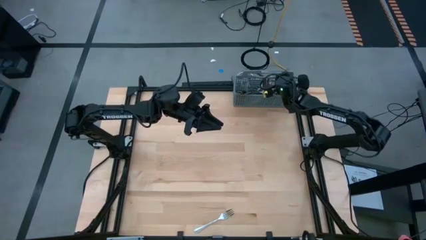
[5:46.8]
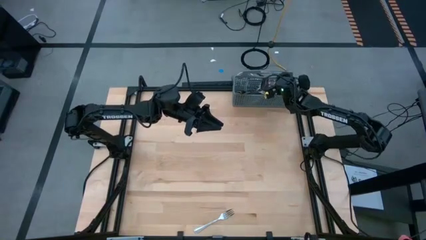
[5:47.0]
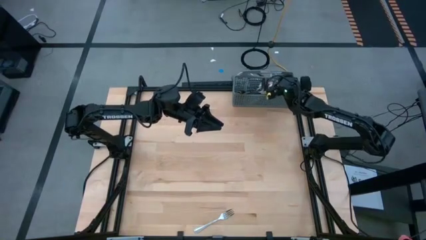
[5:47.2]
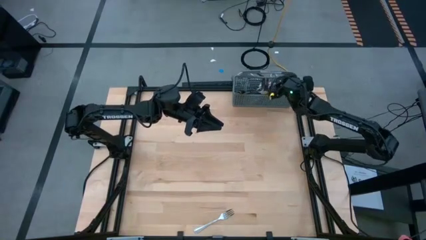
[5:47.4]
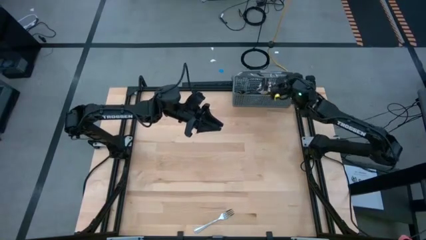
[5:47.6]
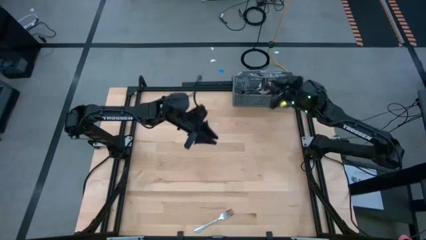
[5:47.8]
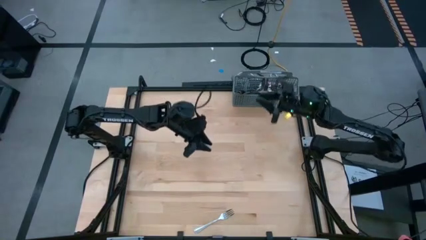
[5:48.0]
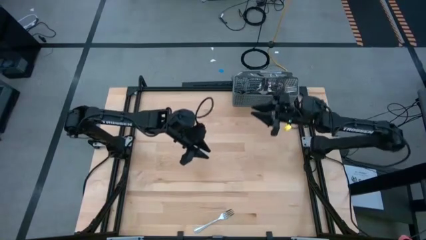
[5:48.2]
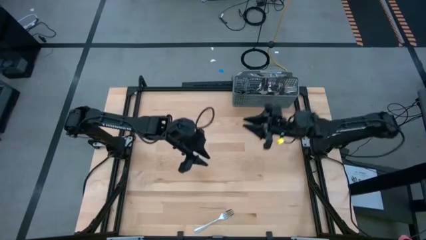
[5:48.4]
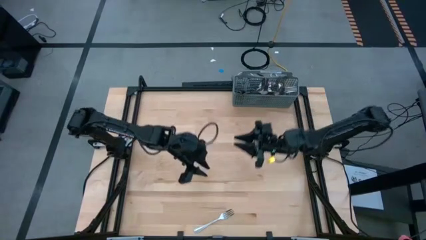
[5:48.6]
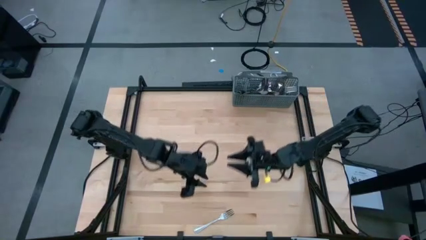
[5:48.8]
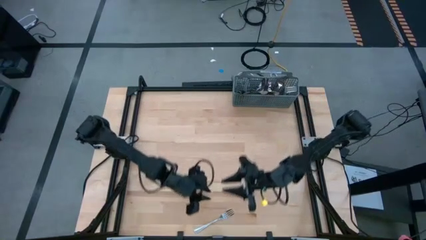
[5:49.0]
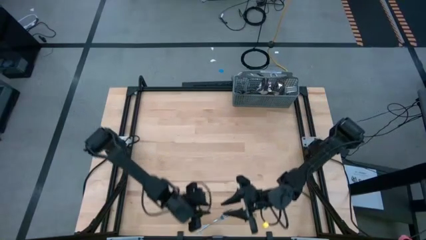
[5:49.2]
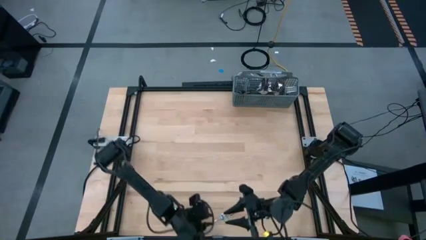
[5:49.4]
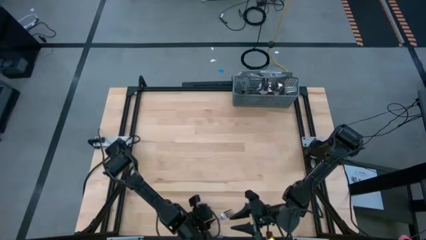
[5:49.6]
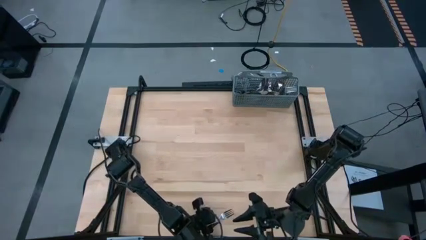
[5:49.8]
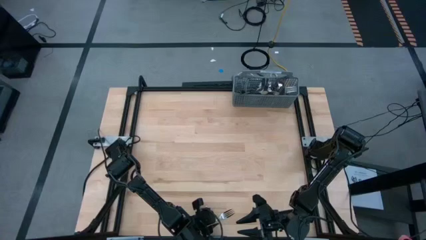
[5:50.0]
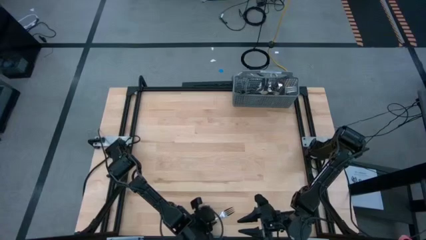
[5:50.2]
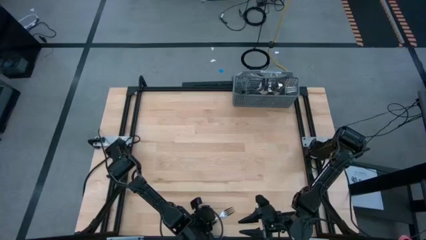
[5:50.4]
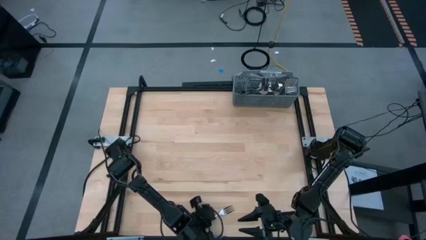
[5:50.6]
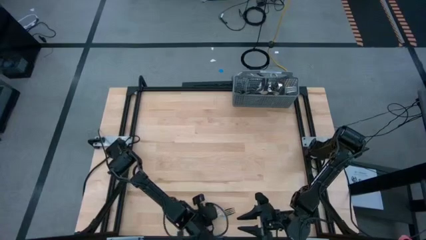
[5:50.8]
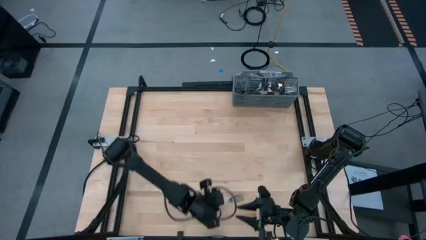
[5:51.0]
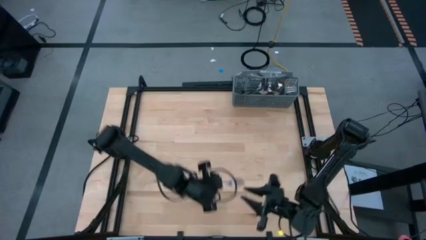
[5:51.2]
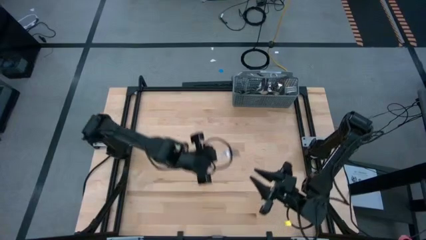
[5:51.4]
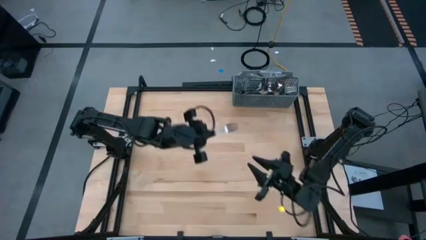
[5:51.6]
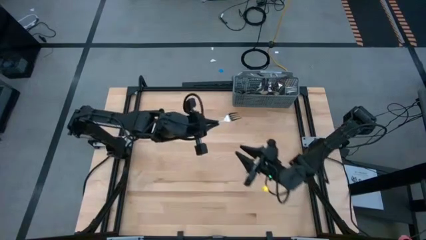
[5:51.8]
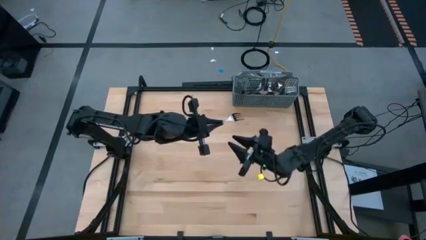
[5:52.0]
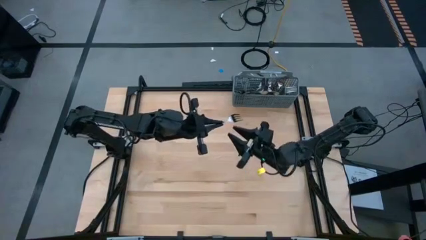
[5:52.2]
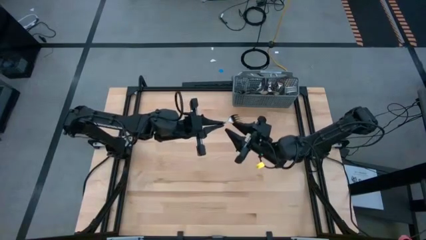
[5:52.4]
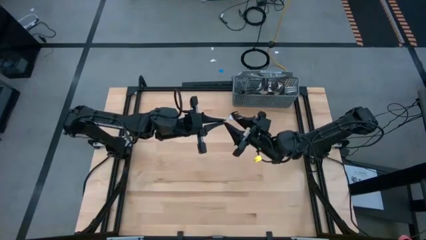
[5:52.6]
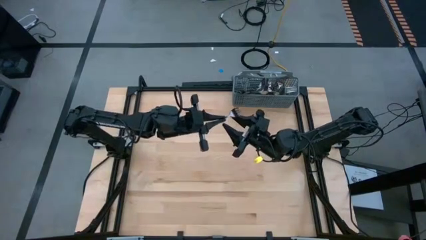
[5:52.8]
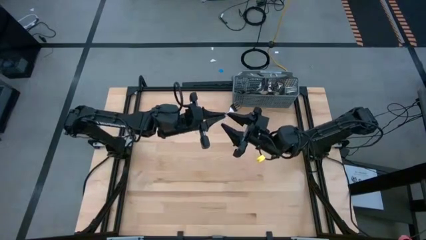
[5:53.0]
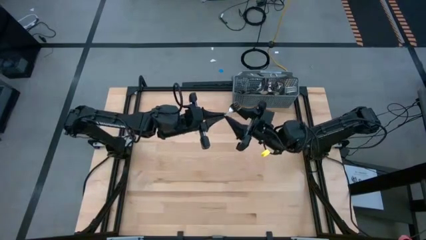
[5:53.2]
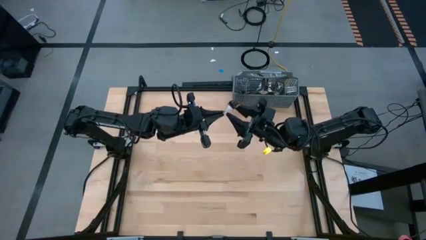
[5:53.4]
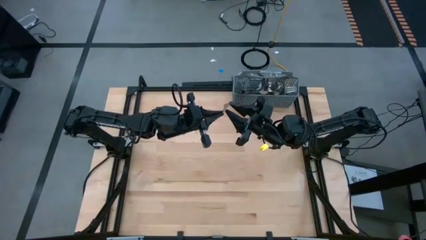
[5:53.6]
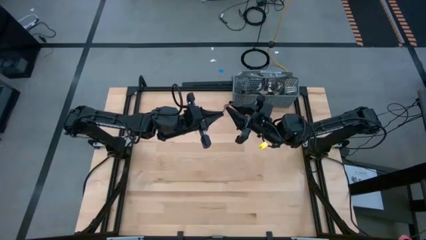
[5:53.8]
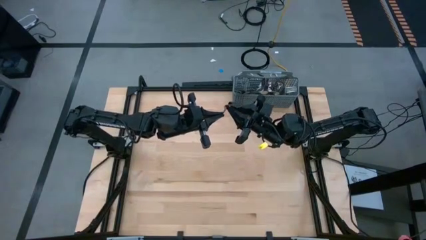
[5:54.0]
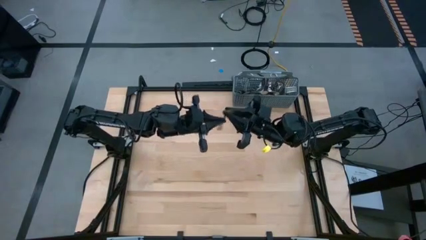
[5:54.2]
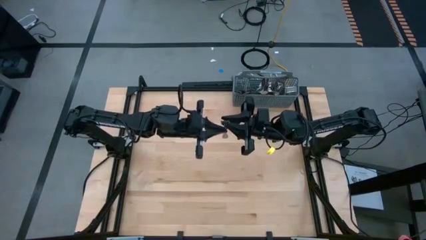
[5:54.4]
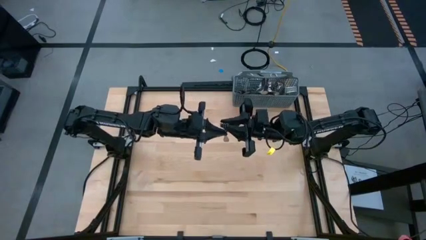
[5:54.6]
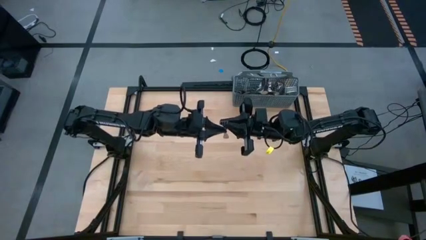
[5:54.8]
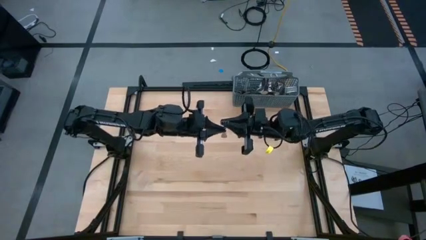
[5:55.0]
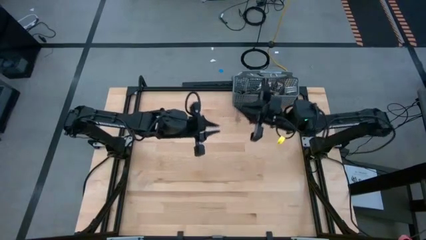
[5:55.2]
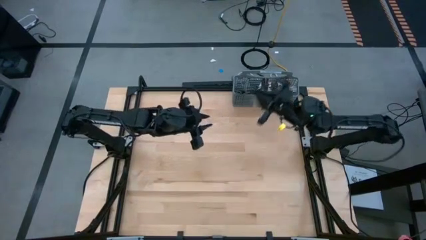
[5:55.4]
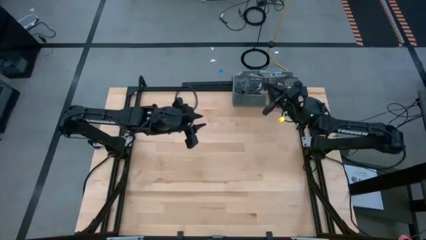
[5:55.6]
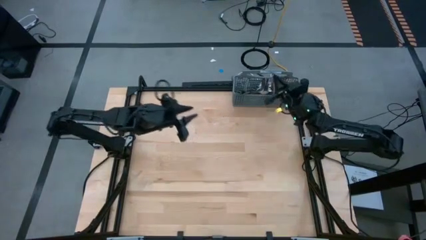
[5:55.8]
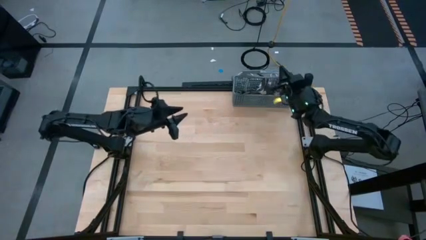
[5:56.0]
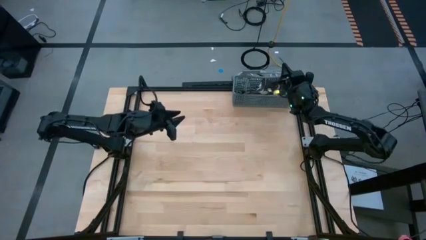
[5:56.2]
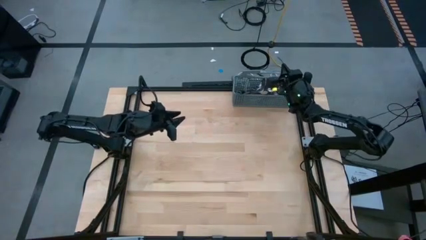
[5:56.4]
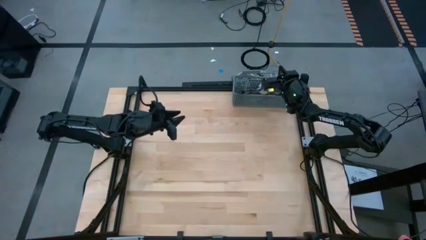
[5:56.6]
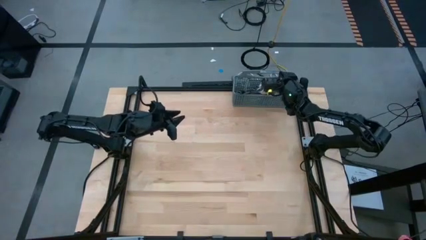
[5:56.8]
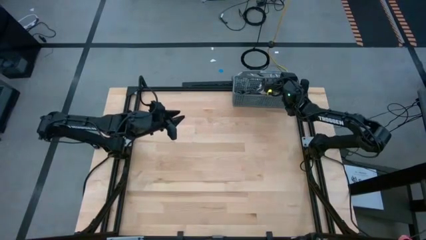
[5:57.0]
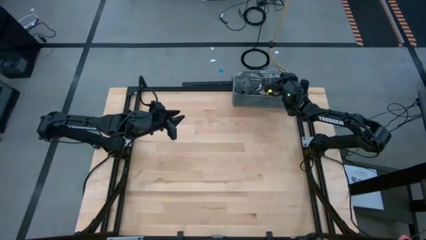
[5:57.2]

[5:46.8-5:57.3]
Task: Sort silverware
Put the silver fork into the silverware basket

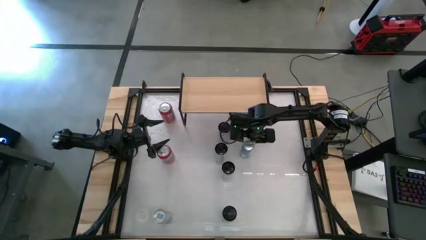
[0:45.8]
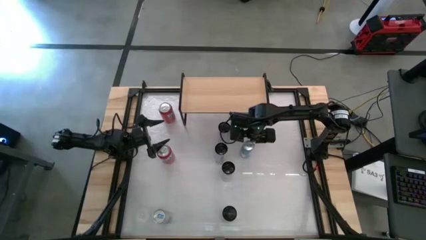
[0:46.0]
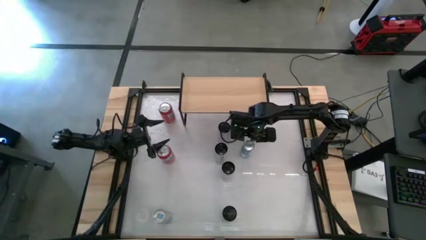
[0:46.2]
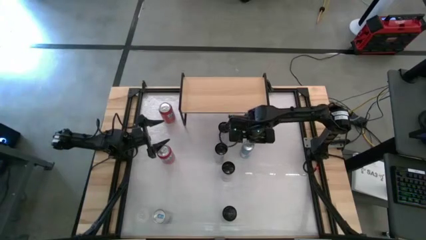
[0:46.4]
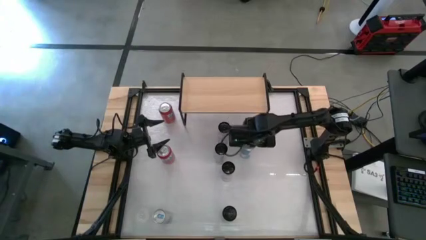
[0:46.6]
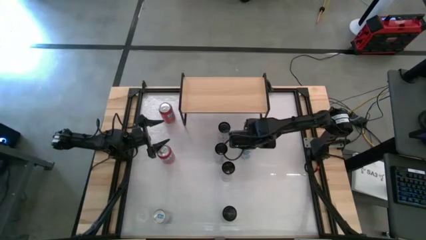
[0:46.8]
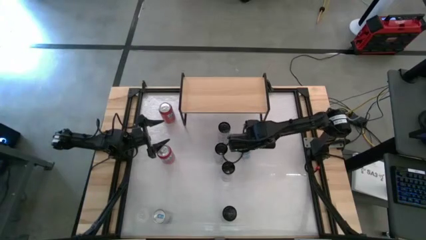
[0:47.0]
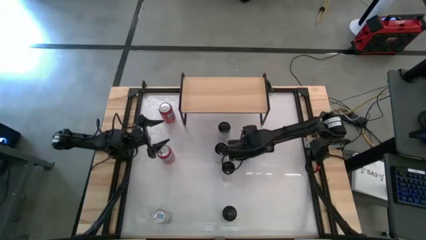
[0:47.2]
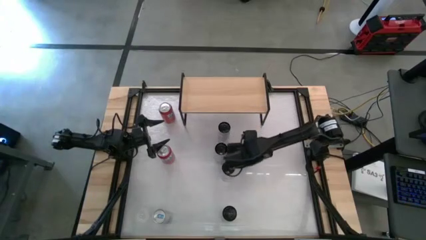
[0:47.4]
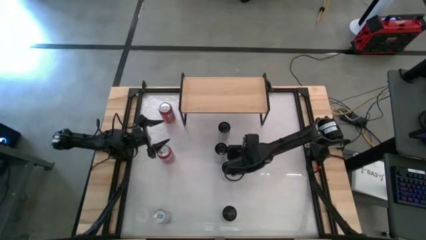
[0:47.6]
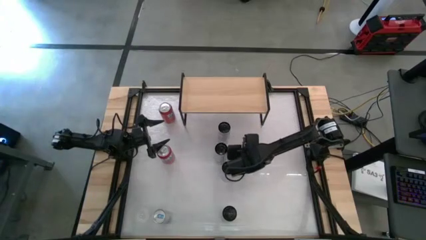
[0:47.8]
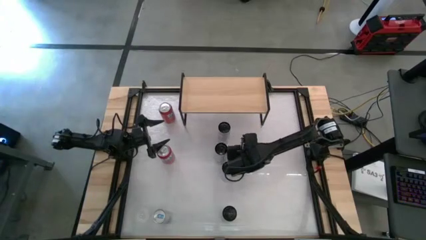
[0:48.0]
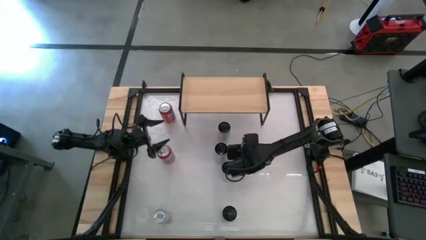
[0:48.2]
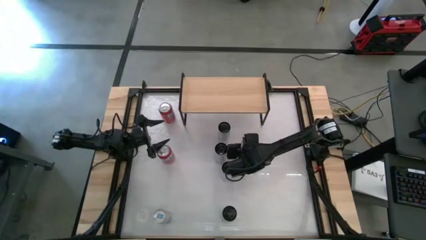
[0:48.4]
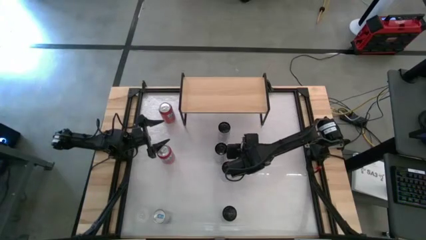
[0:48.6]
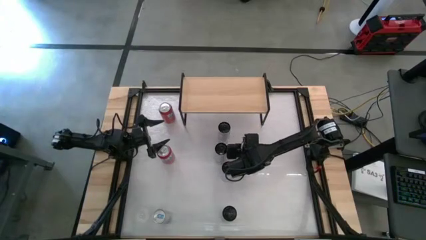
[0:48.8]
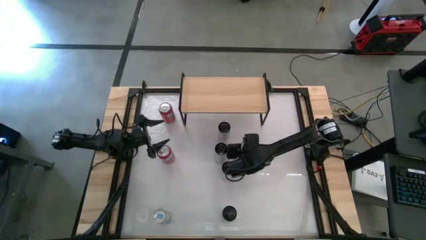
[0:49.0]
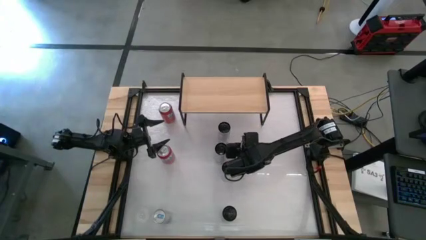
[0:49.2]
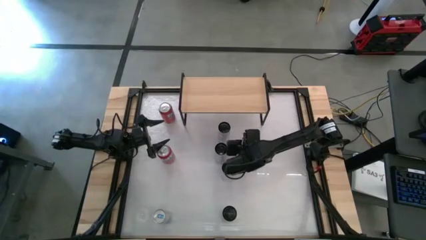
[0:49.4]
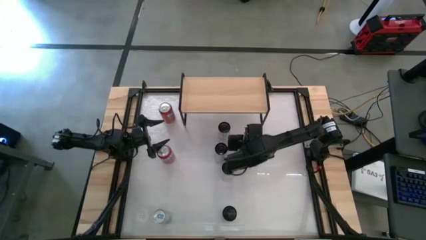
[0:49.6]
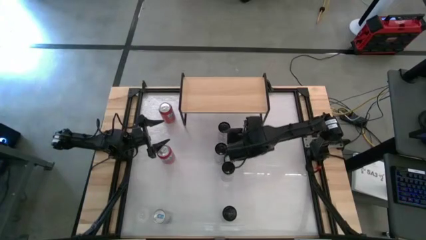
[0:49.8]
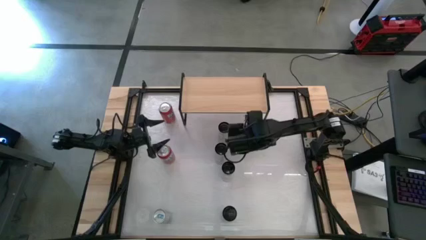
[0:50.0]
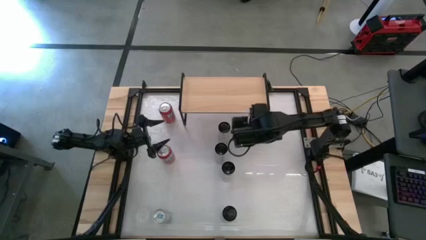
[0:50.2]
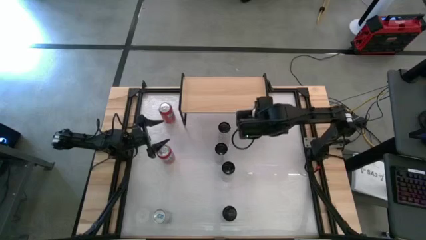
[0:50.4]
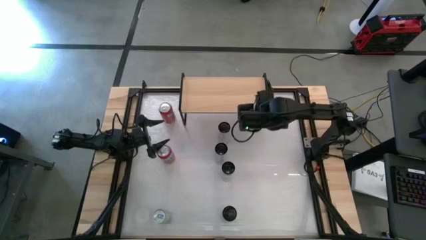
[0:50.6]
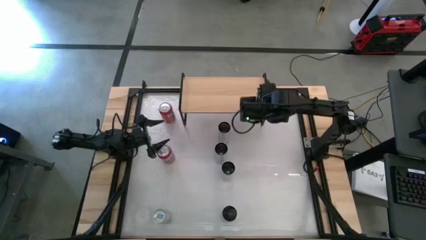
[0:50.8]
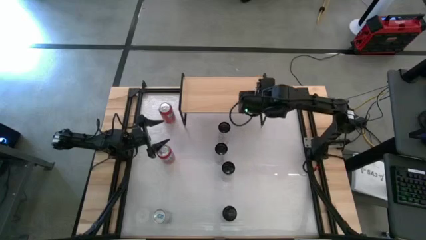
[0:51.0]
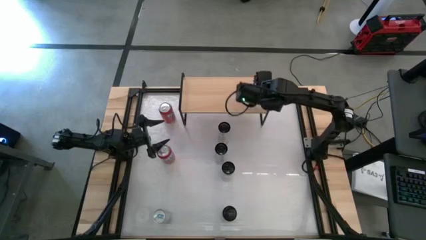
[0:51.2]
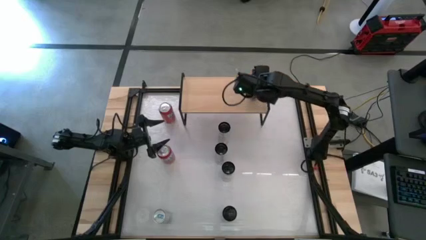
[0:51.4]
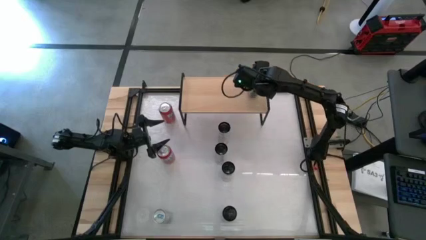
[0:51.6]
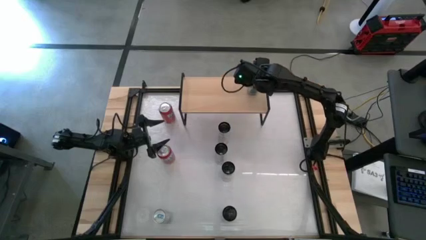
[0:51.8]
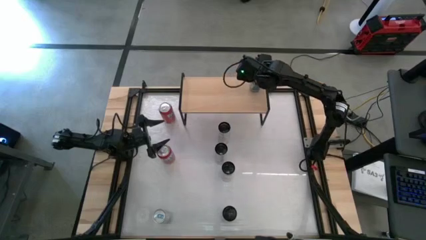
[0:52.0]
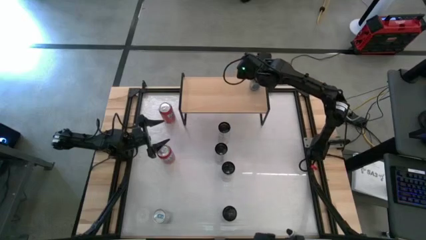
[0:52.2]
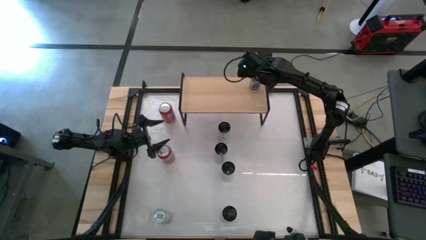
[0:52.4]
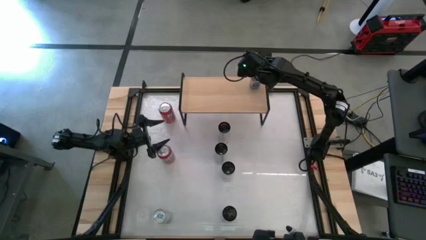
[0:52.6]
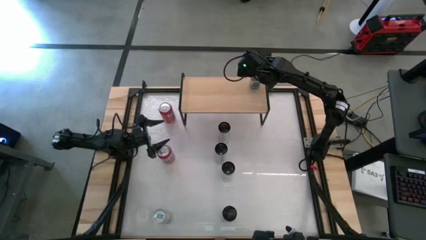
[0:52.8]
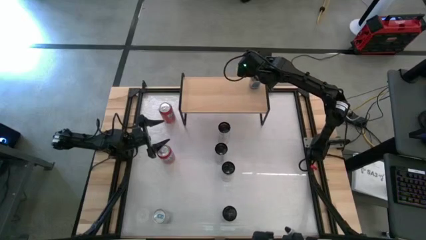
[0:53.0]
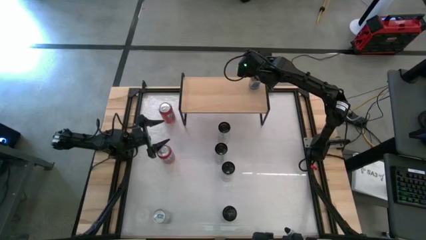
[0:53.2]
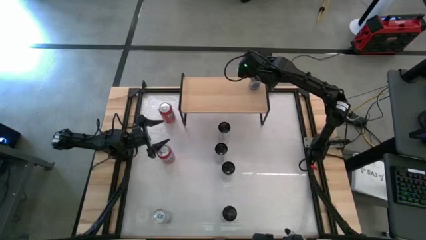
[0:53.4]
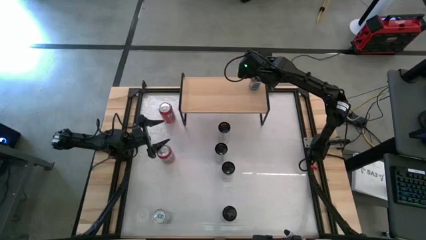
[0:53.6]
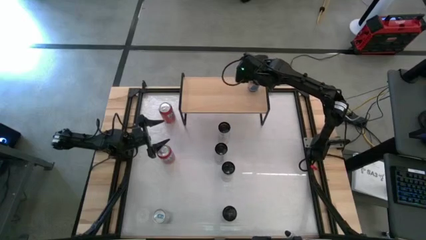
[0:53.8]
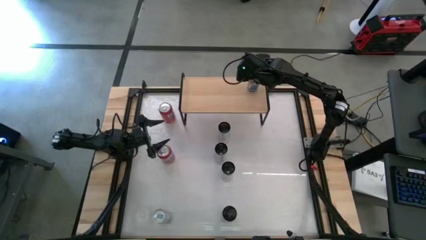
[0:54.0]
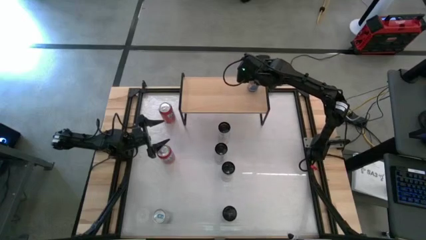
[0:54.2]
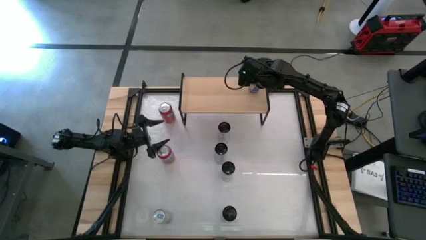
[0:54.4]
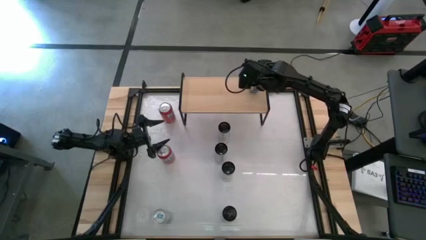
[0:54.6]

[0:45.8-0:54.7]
Task: Place canned beverage on shelf
Put the top blue soda can on the shelf
